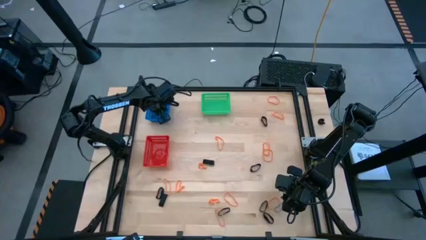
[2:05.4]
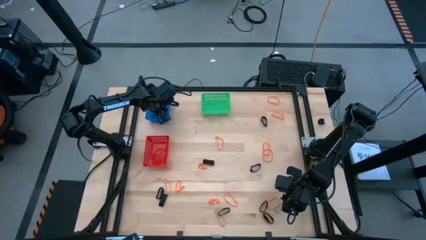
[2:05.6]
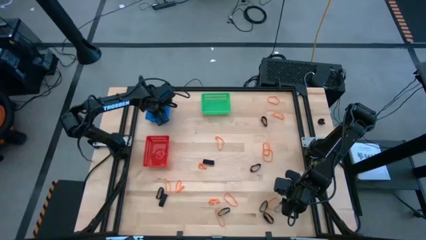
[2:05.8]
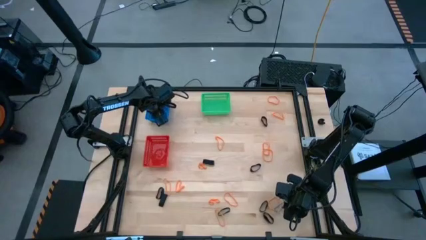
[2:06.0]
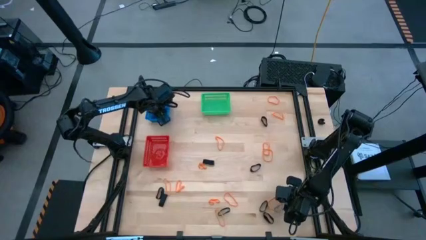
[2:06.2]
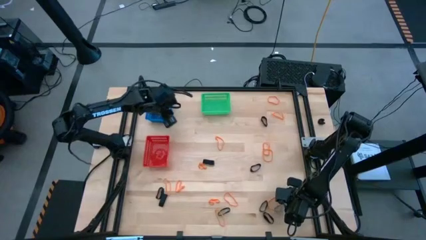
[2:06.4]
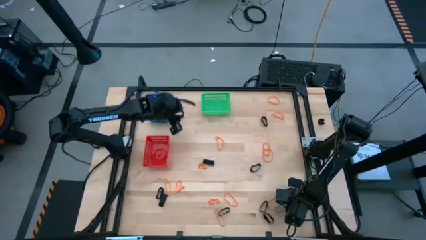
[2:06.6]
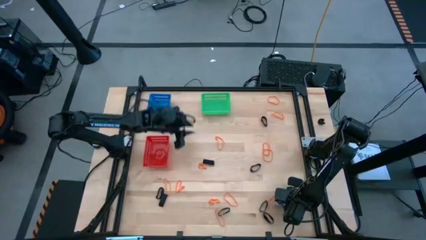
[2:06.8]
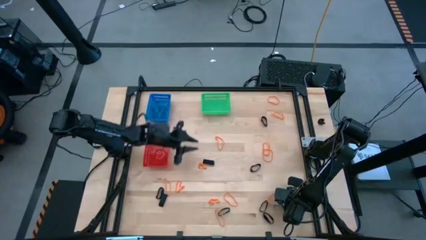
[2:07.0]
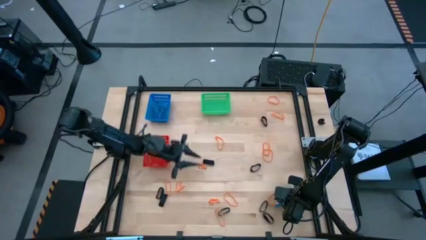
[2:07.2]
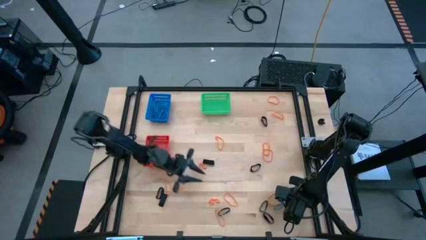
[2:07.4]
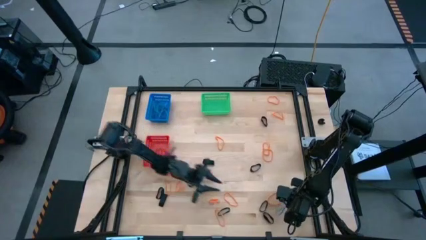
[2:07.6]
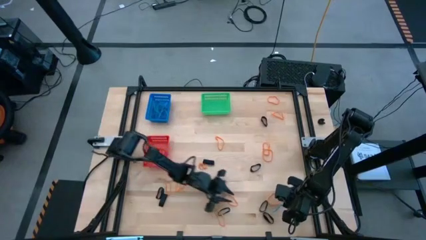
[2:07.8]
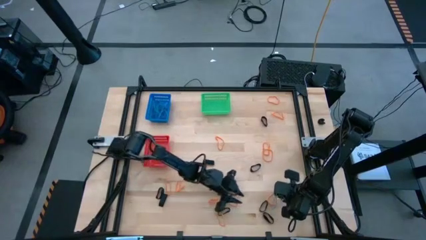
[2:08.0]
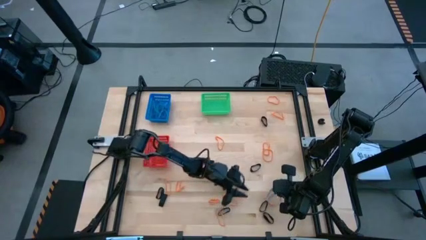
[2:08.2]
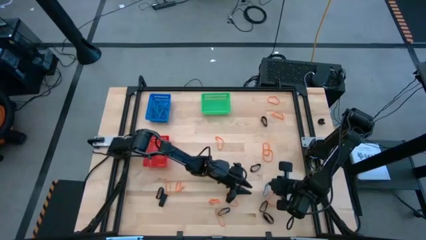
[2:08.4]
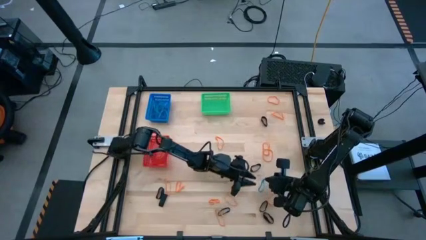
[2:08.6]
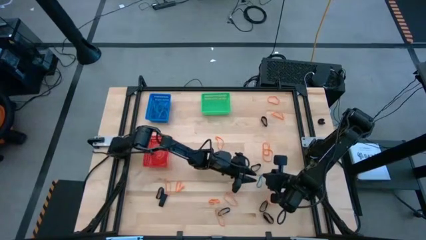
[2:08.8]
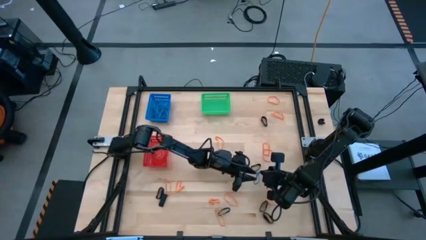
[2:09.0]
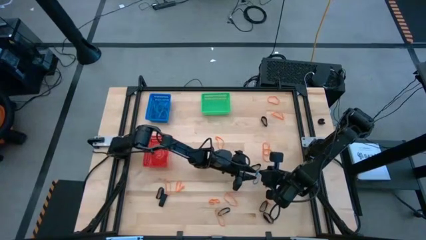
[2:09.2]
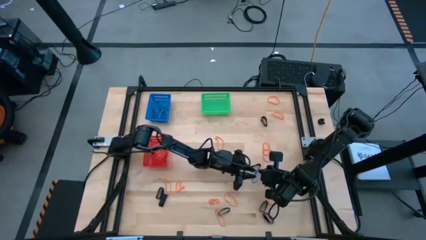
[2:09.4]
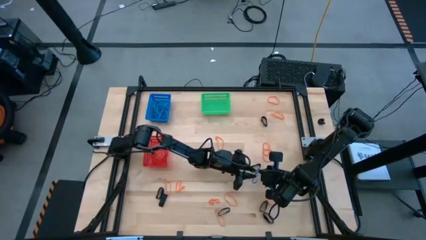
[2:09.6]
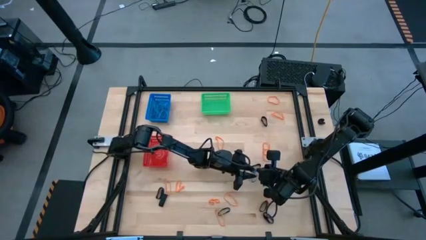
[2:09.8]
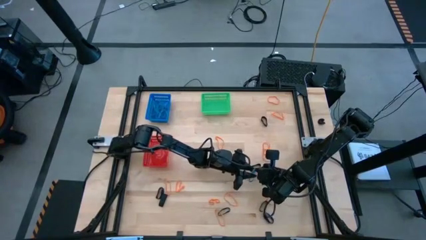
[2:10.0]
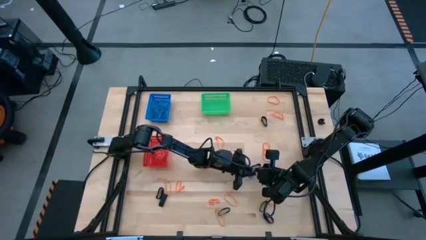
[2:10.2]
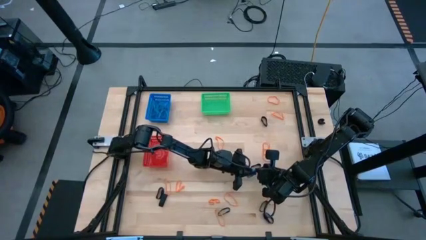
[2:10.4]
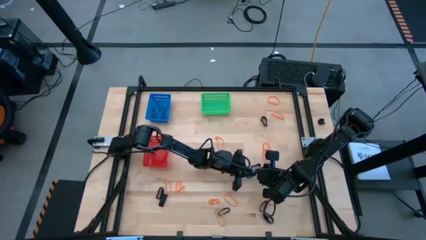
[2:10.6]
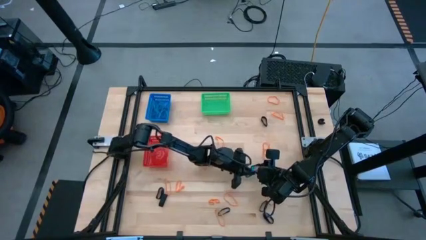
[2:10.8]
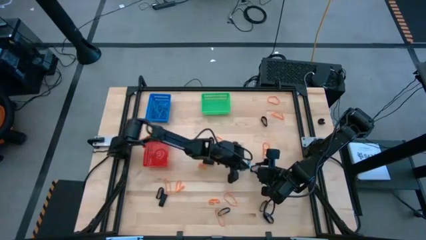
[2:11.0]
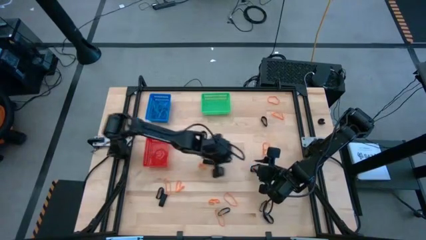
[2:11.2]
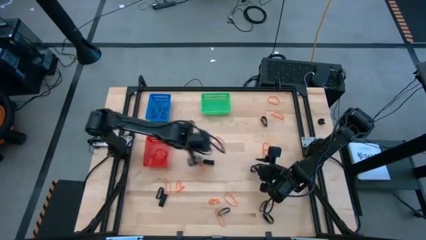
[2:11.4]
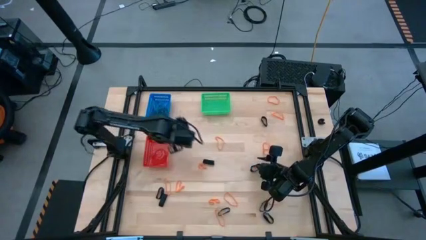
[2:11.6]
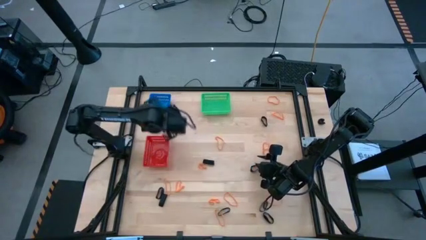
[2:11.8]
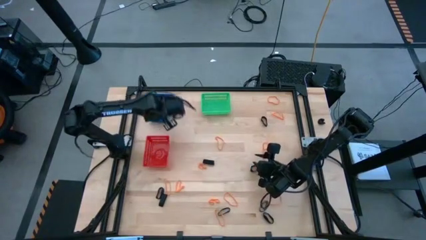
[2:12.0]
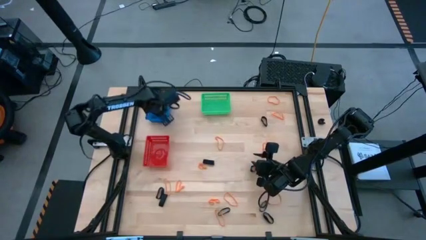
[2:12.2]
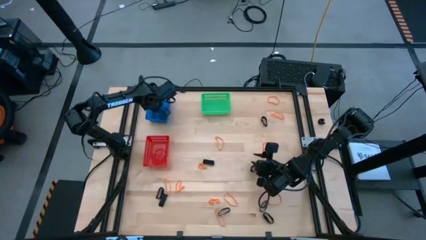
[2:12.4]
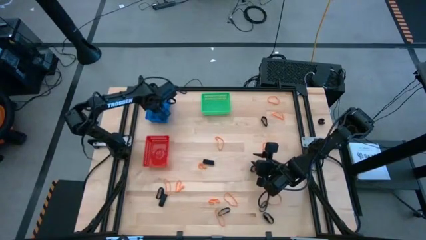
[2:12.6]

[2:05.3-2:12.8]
Task: Sort rubber bands into baskets
Put the blue rubber band into the blue bin

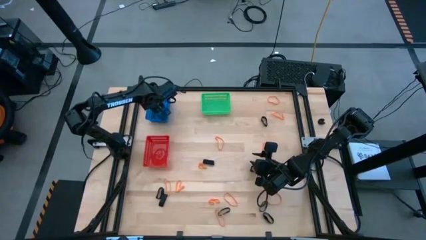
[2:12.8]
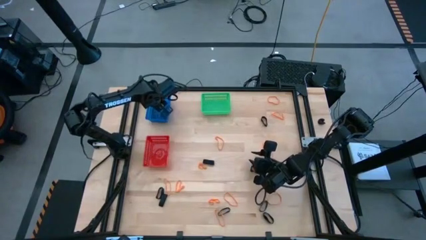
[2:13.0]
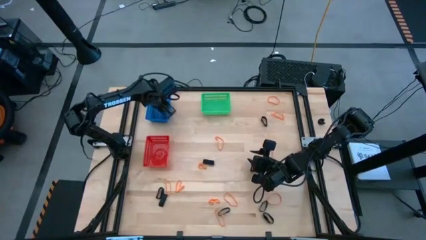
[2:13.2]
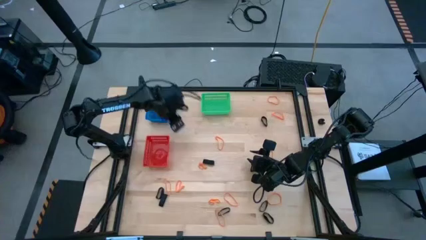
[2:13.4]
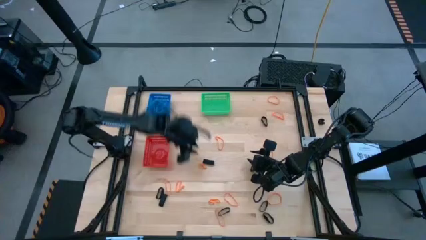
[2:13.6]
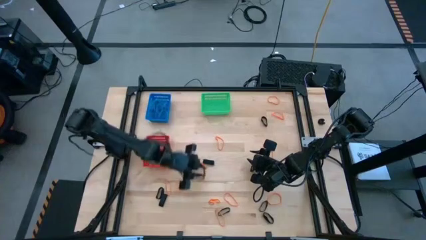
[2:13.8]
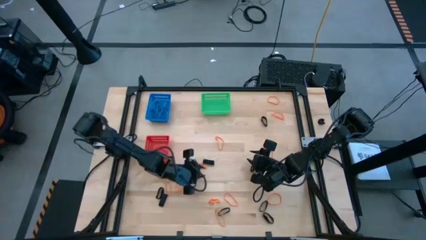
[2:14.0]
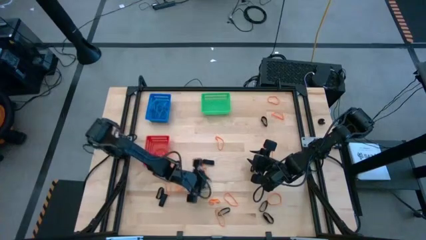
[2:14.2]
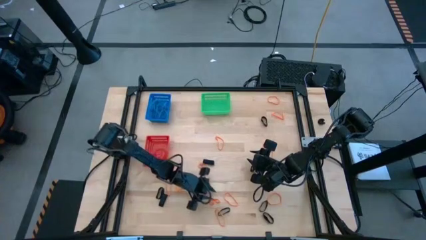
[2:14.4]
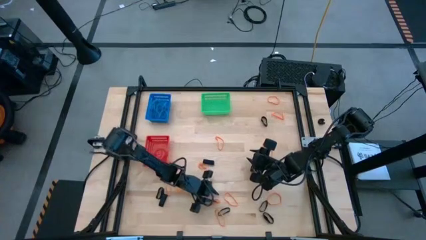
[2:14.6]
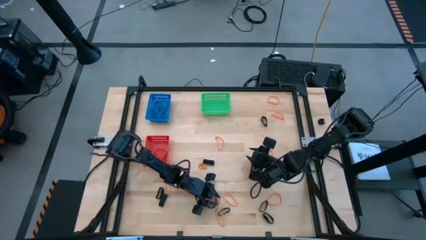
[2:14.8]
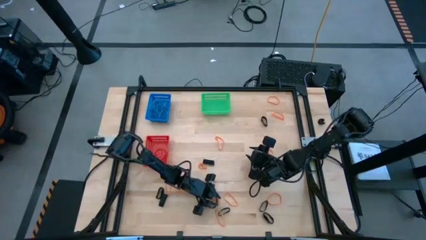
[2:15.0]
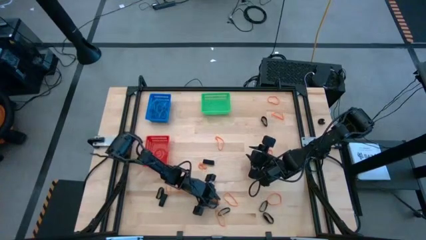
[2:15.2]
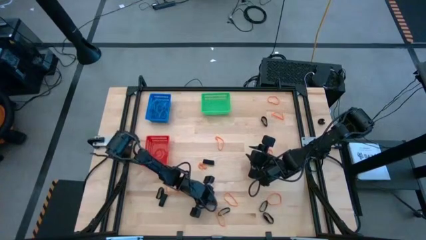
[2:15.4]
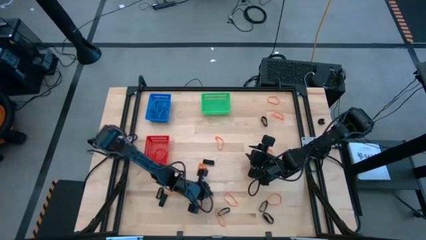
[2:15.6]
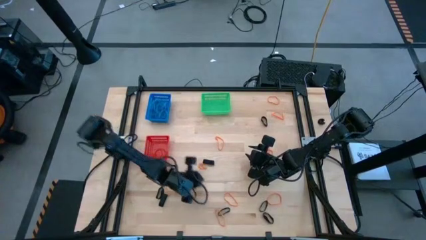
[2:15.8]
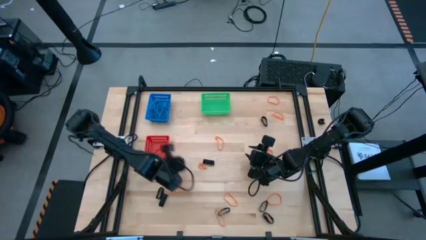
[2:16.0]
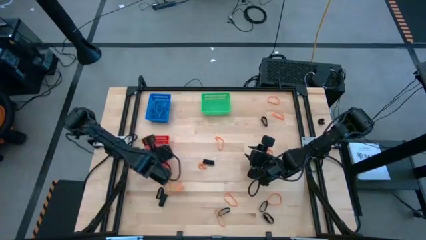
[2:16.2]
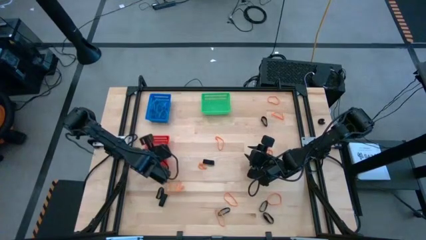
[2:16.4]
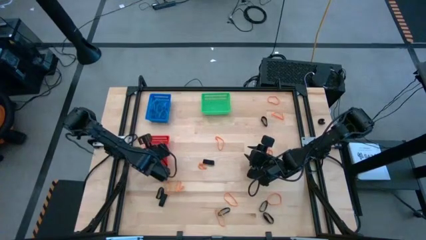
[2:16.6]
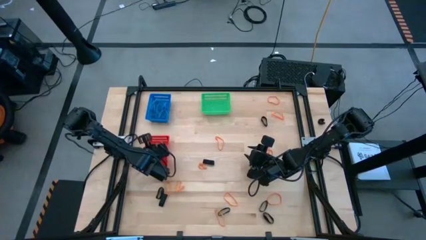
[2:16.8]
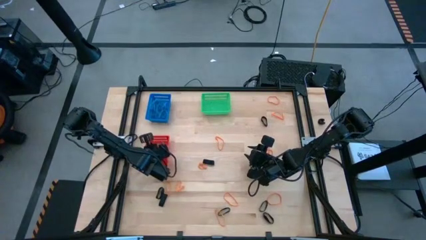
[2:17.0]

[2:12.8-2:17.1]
Put the orange rubber band into the red bin

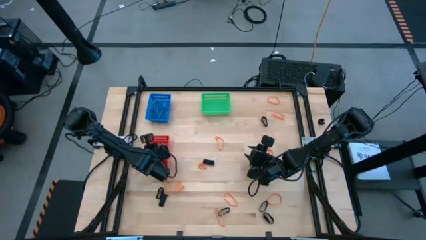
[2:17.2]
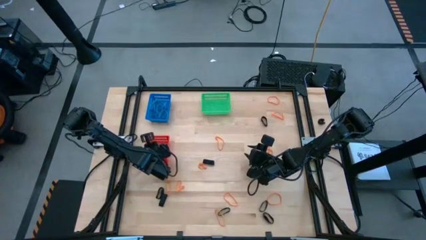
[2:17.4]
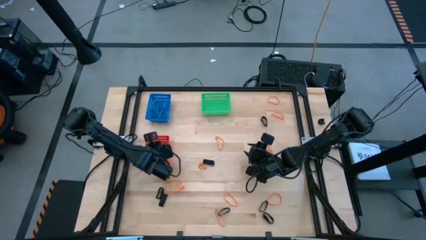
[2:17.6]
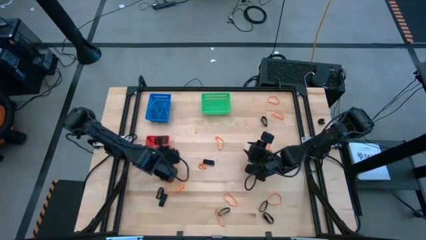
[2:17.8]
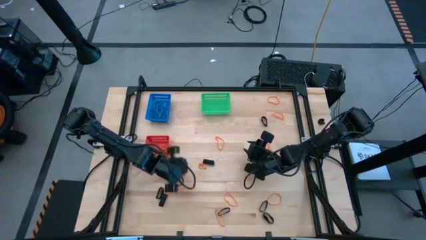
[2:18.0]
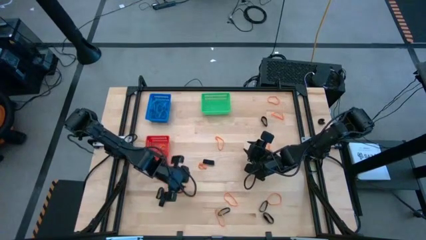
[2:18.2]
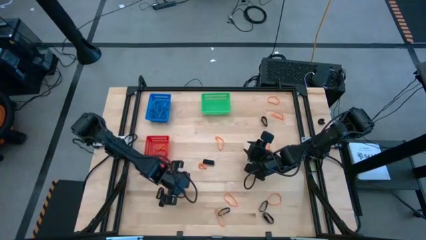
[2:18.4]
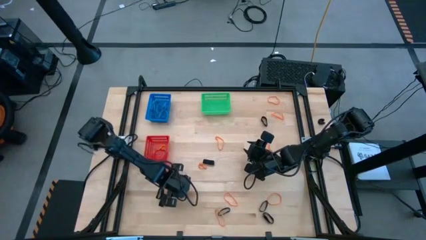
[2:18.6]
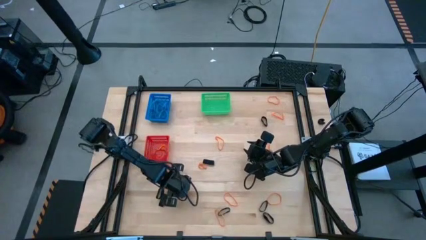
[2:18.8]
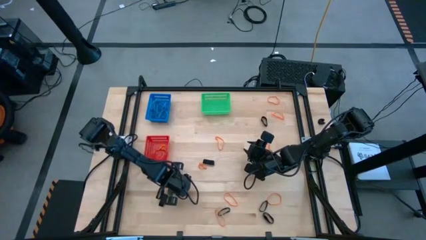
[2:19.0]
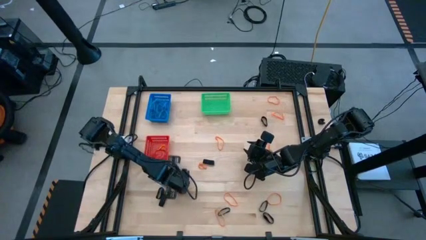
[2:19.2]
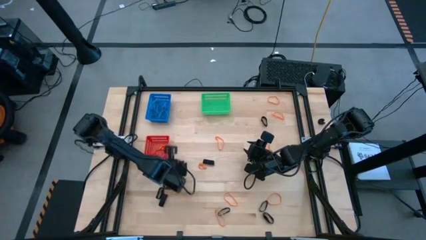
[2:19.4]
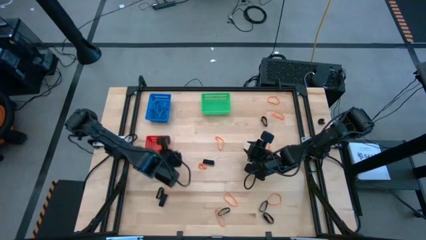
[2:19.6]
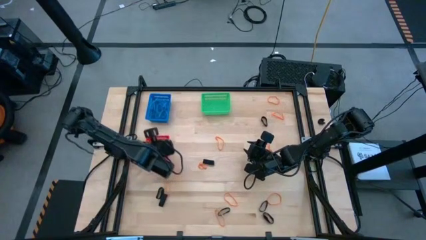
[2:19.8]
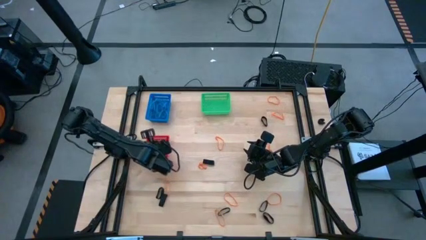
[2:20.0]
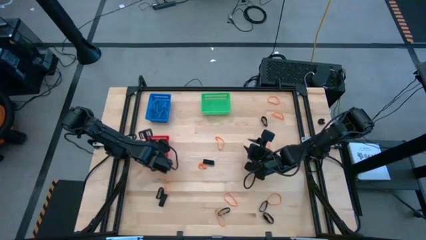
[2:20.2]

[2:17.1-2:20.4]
Put the orange rubber band into the red bin

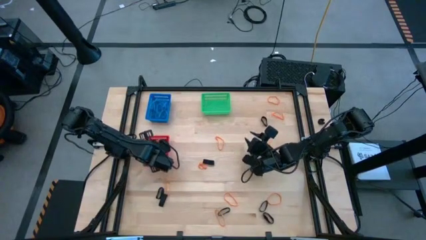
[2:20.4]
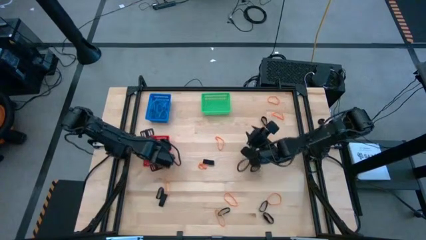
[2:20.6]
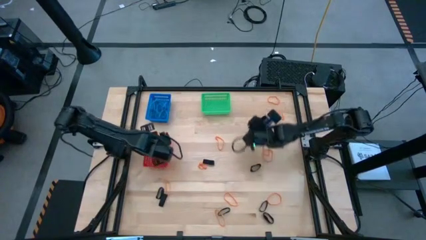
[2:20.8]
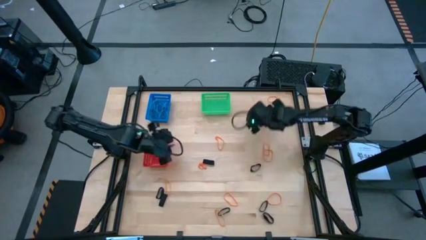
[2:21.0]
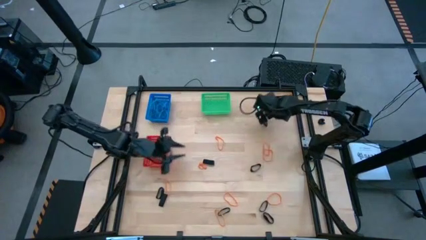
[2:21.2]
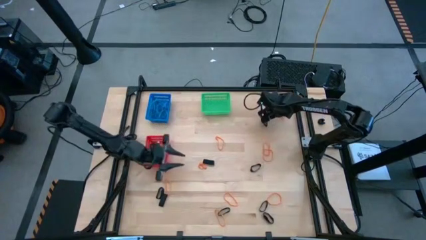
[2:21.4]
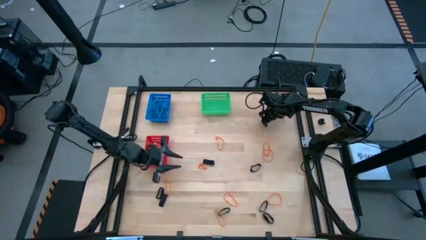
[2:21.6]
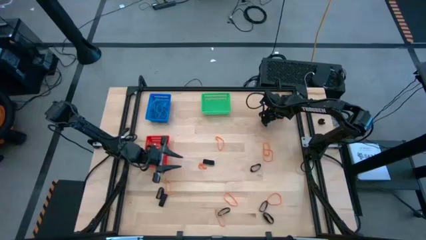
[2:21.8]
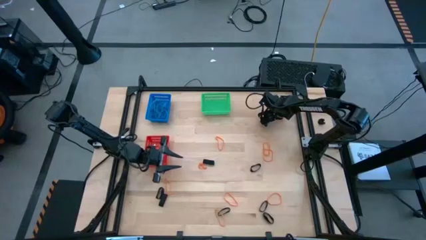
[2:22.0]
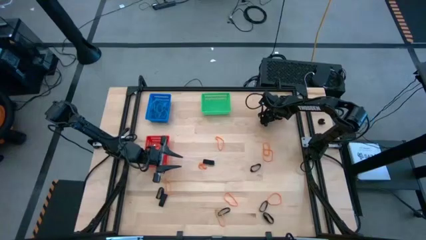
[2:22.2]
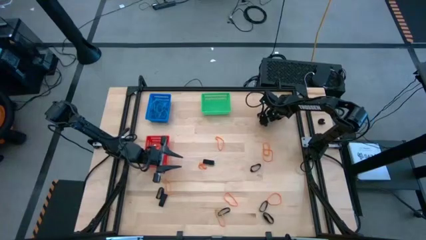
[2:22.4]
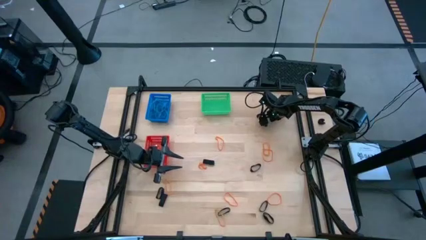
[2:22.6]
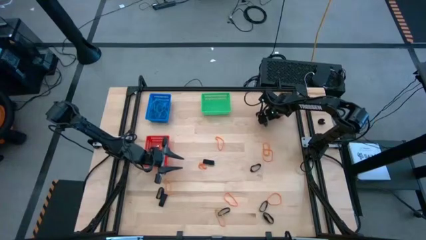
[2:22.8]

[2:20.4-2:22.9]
Put the orange rubber band into the red bin
